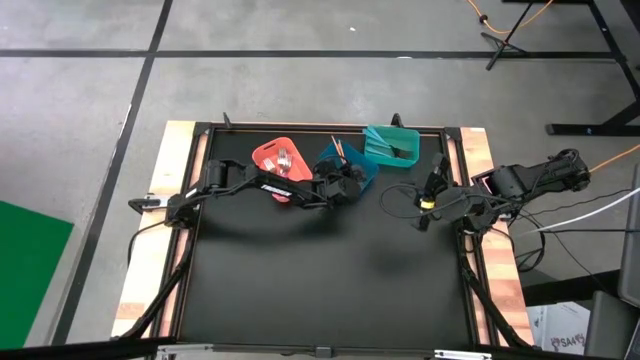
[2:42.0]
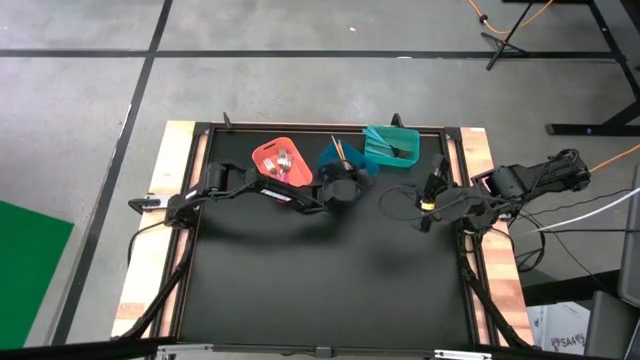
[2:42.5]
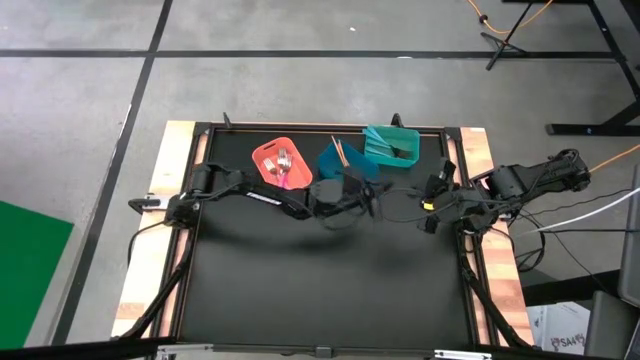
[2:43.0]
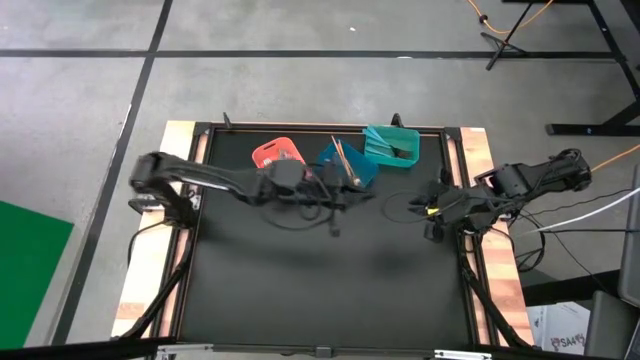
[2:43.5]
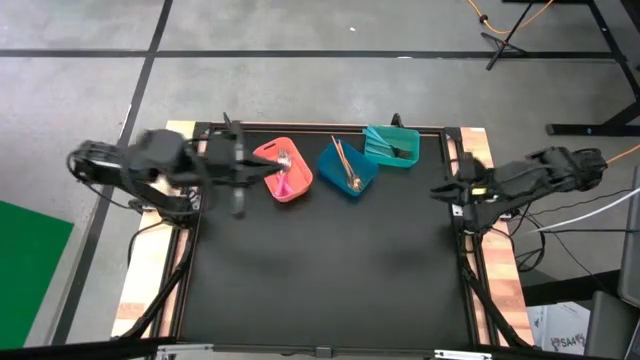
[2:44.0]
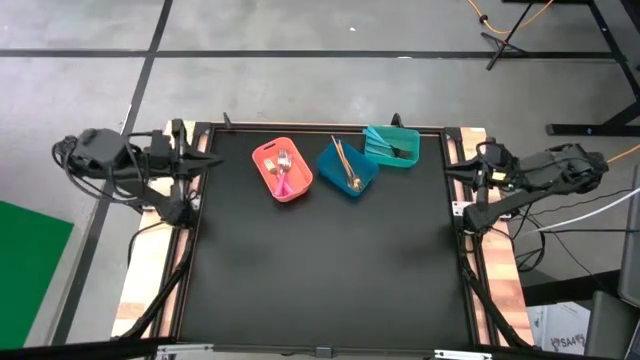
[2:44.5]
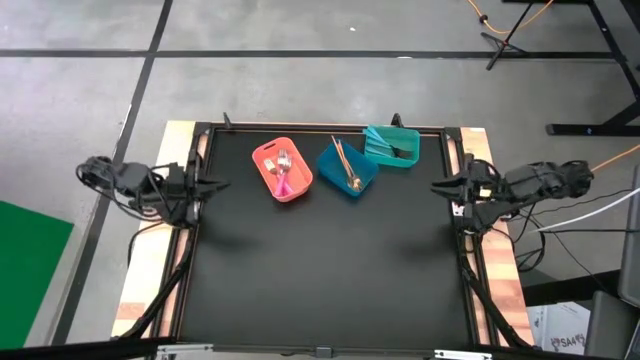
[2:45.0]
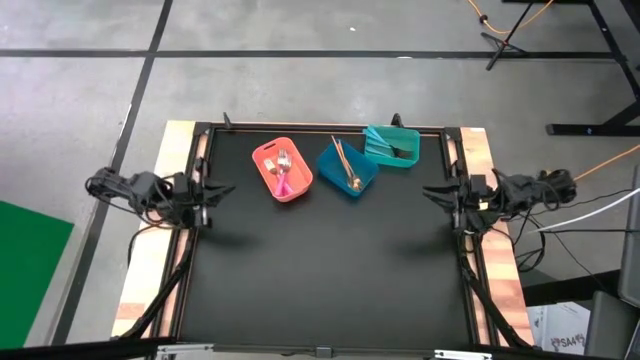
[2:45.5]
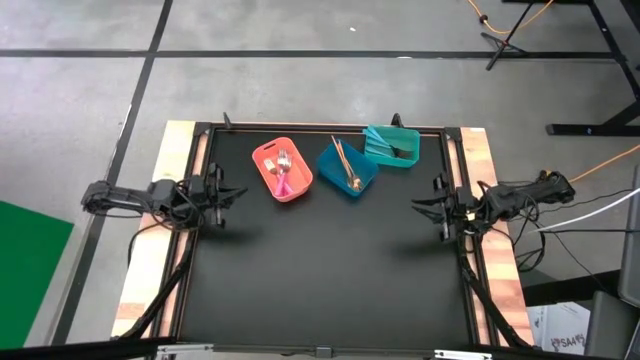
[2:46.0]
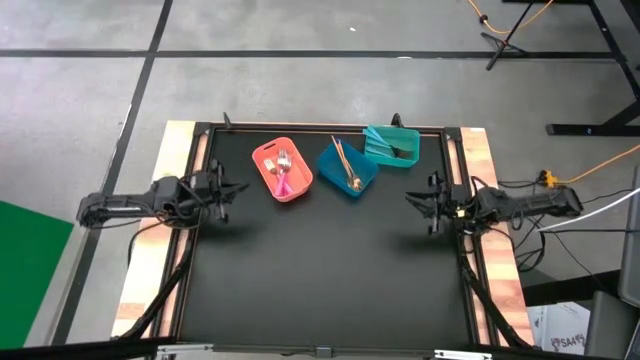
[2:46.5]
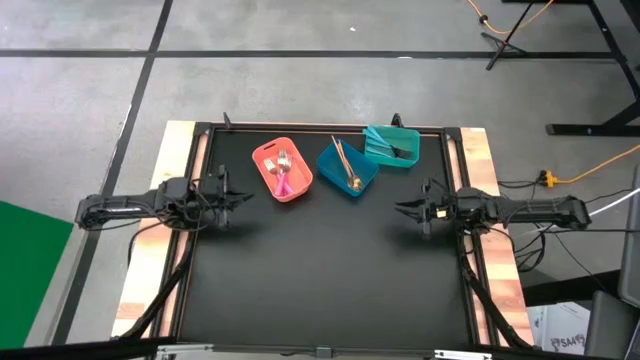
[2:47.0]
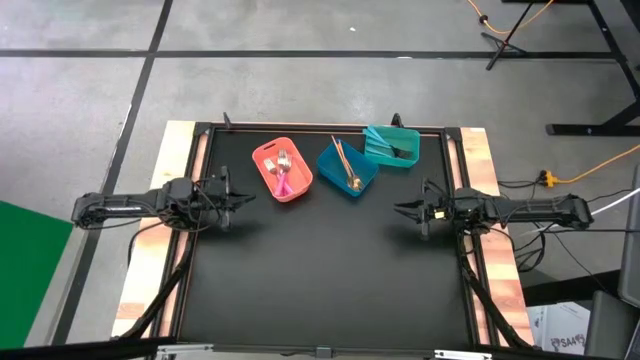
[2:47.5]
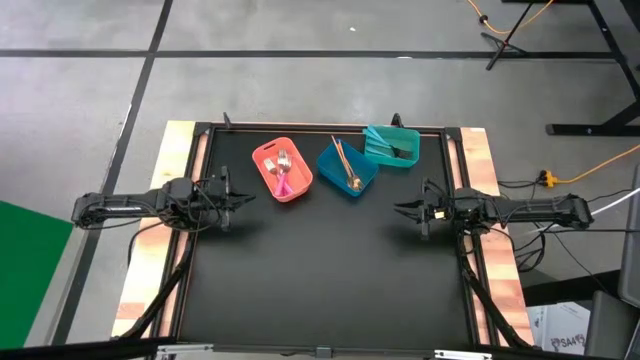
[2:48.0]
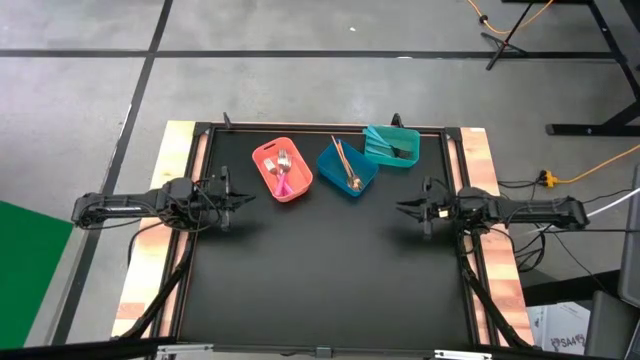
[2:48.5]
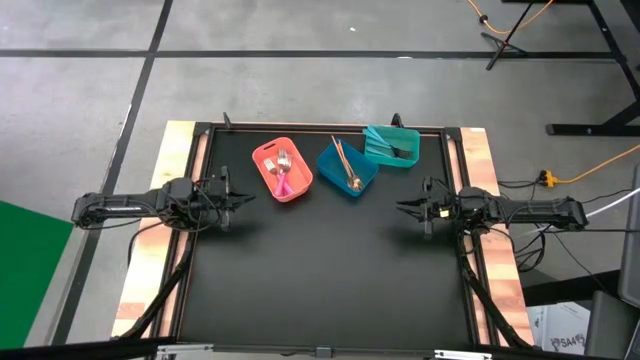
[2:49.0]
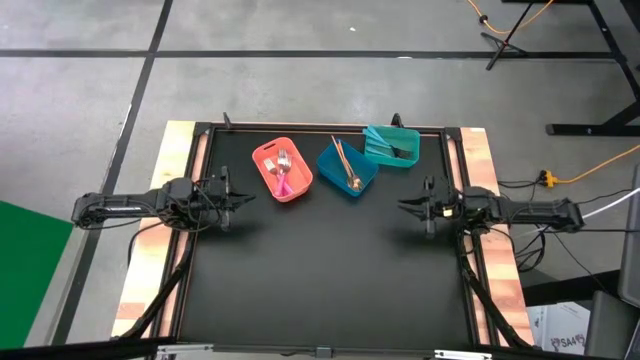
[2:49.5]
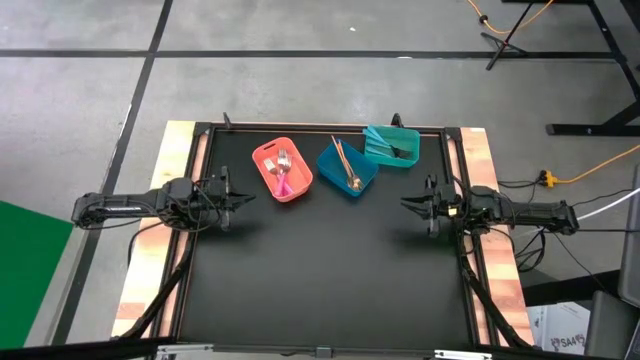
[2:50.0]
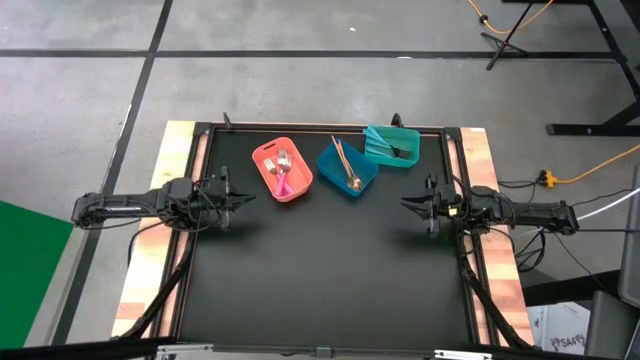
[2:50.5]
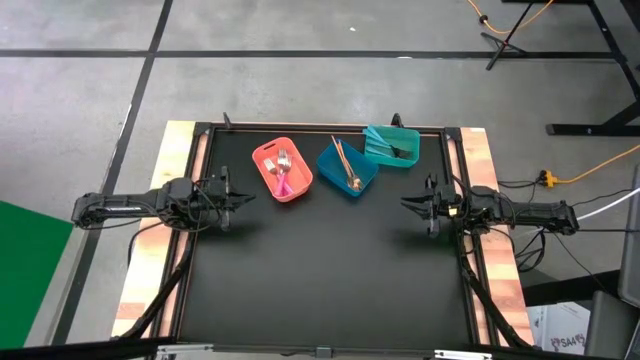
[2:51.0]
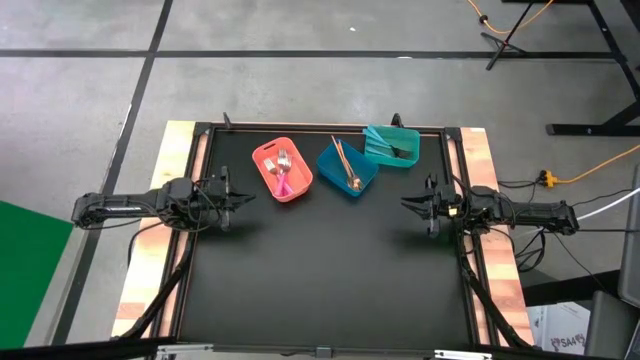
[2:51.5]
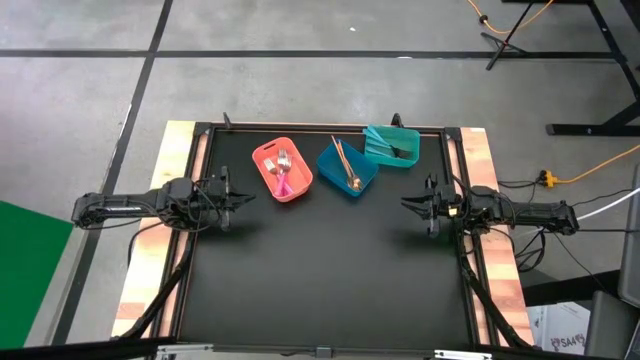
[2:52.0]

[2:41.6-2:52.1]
Task: Sort silverware by color (type)
Return to Home Position

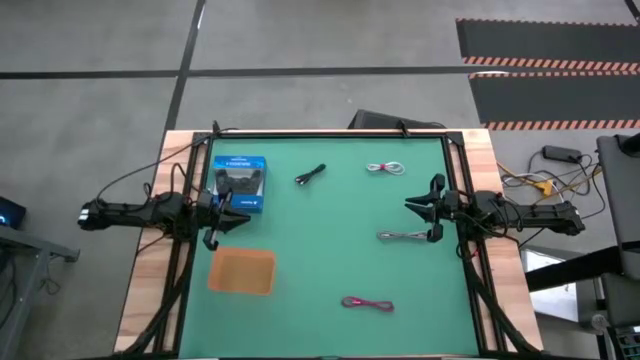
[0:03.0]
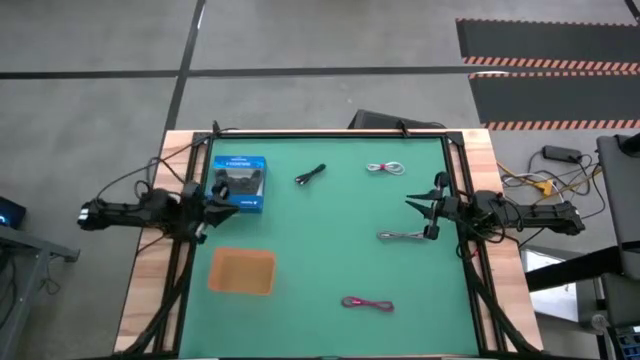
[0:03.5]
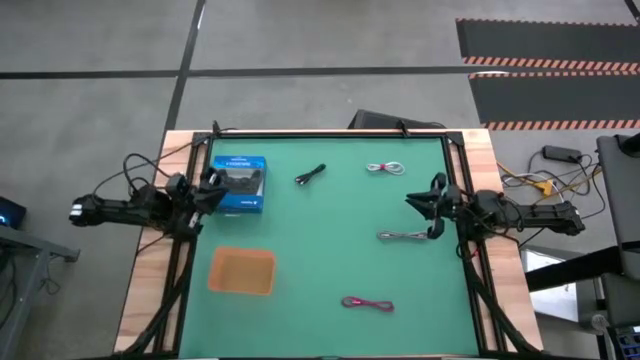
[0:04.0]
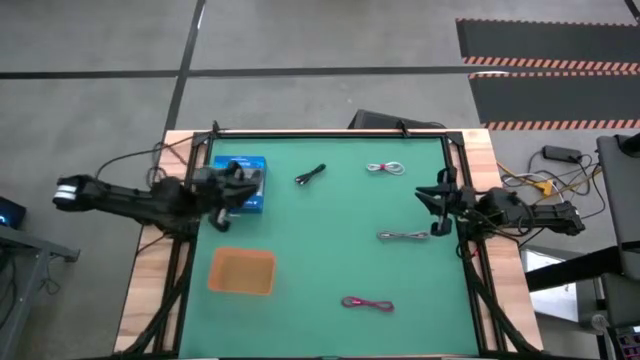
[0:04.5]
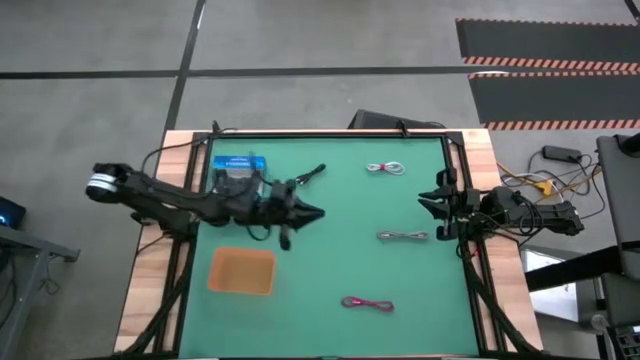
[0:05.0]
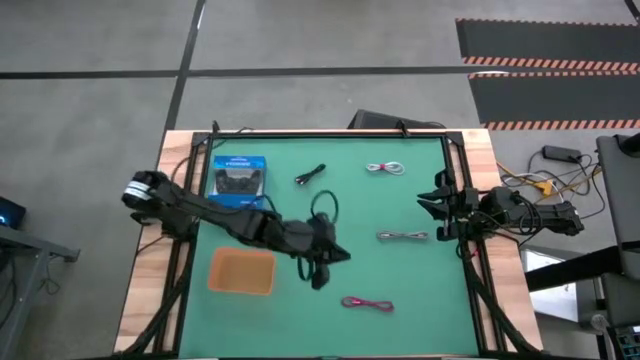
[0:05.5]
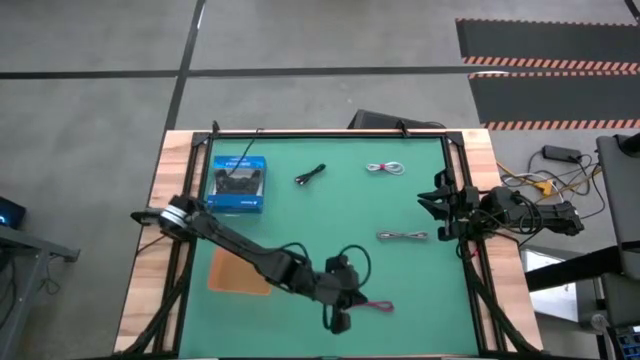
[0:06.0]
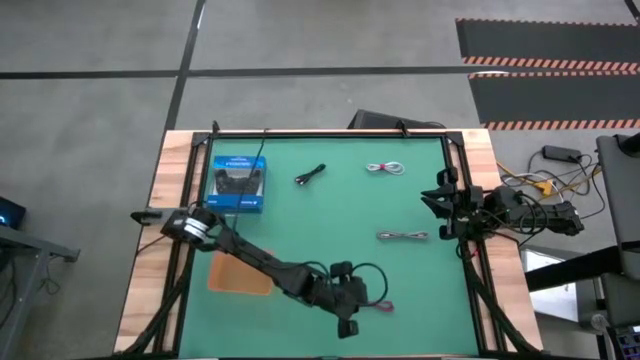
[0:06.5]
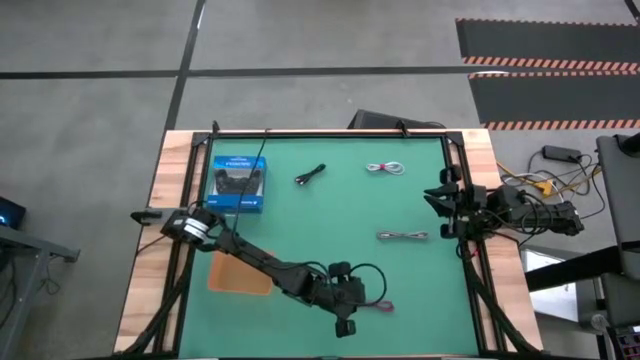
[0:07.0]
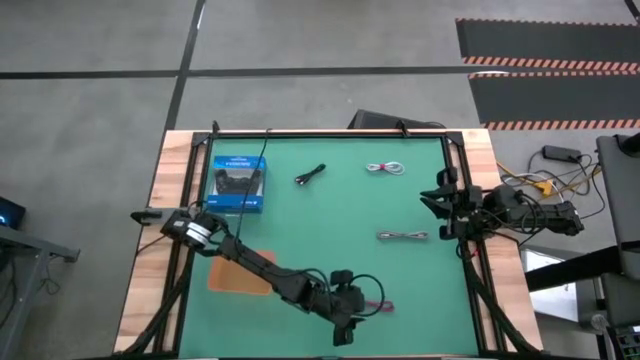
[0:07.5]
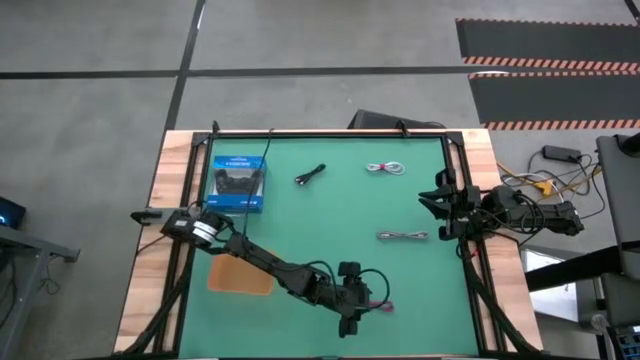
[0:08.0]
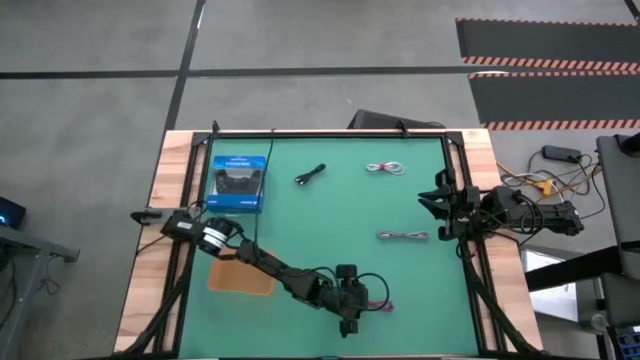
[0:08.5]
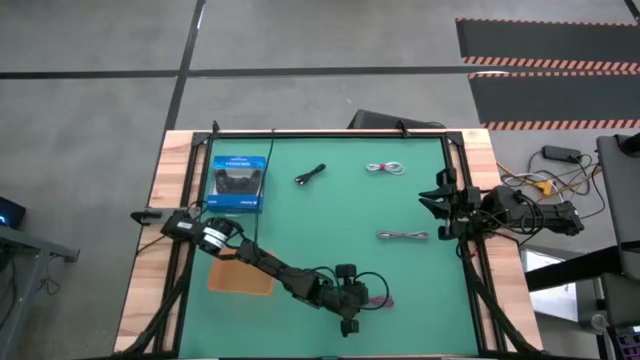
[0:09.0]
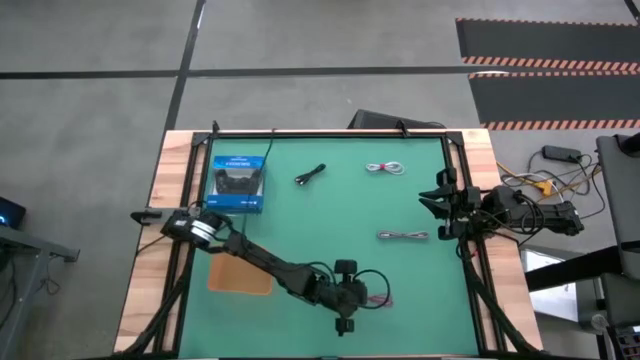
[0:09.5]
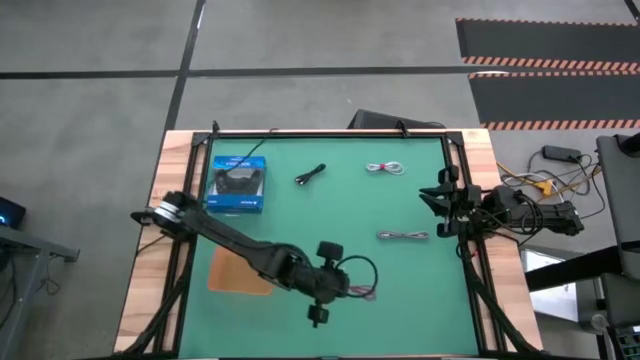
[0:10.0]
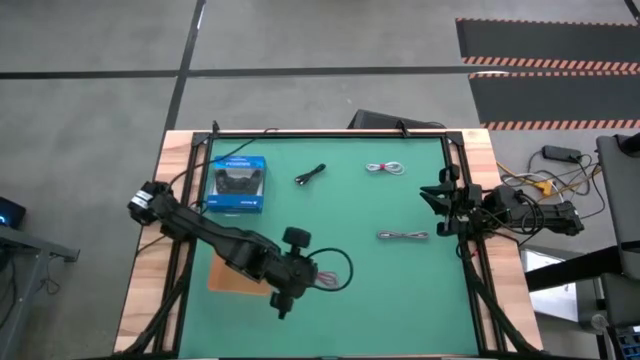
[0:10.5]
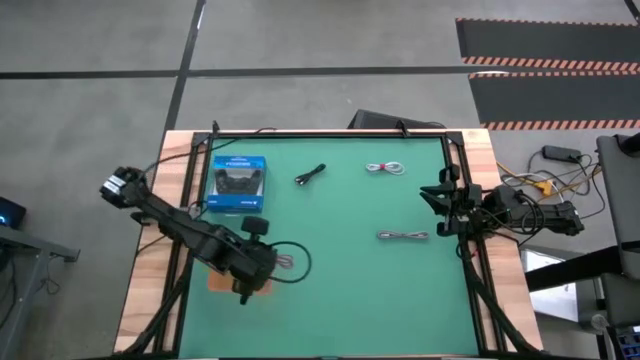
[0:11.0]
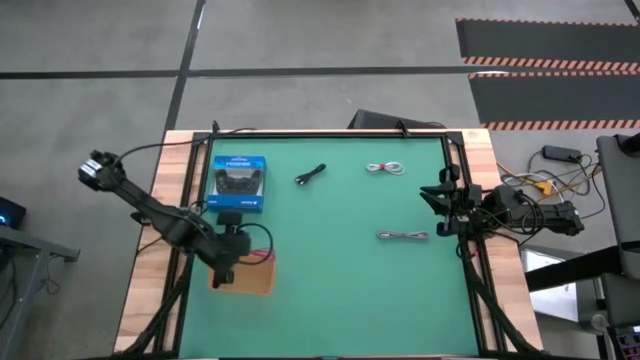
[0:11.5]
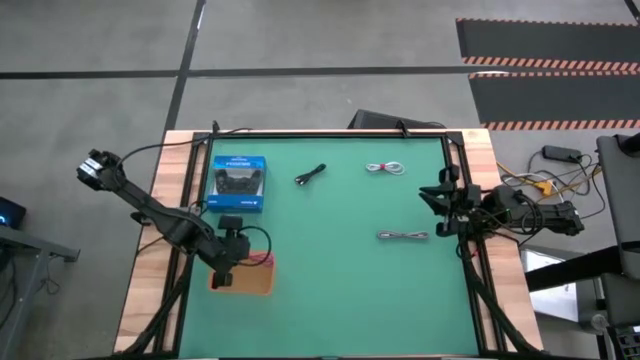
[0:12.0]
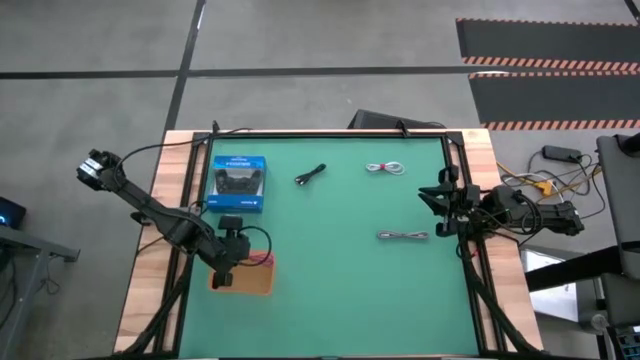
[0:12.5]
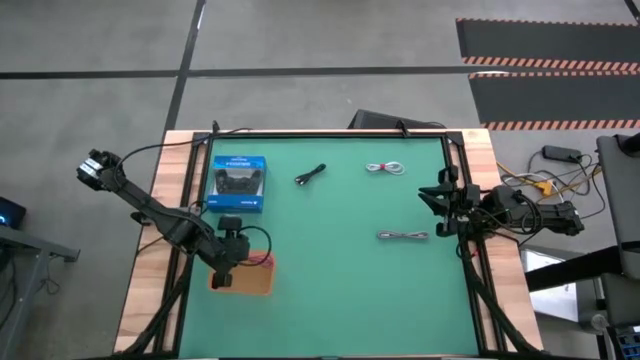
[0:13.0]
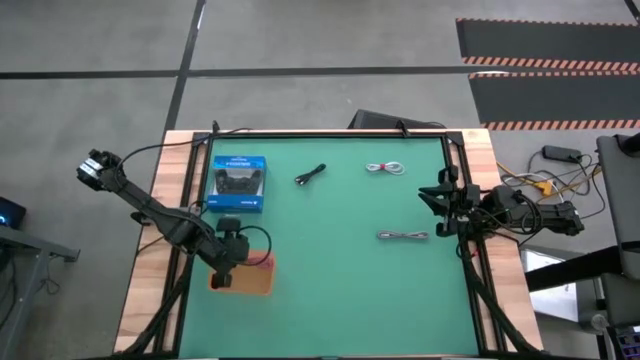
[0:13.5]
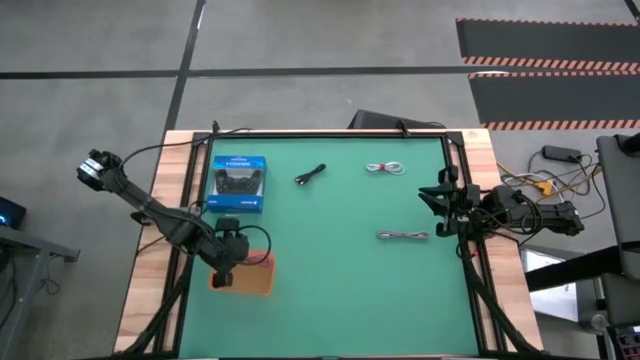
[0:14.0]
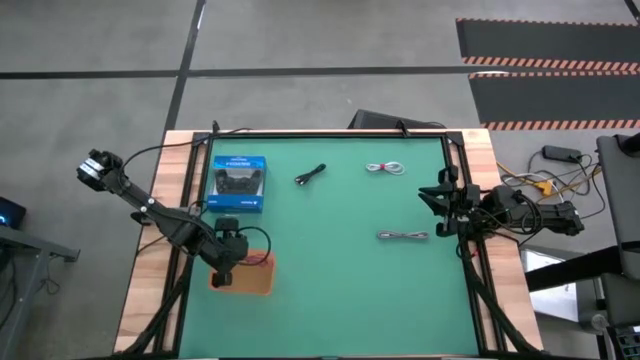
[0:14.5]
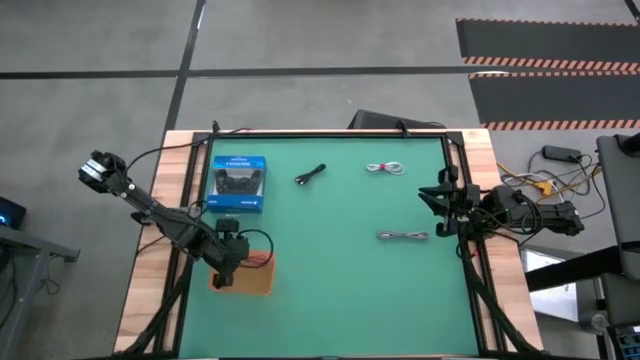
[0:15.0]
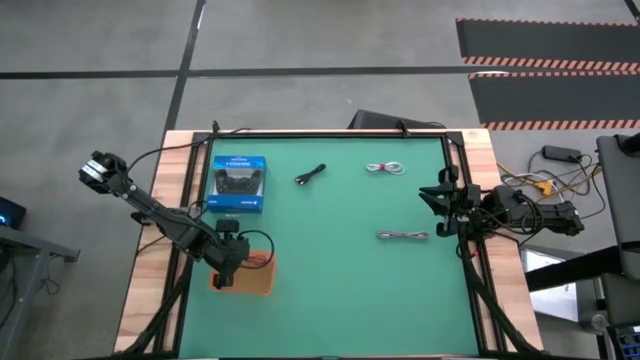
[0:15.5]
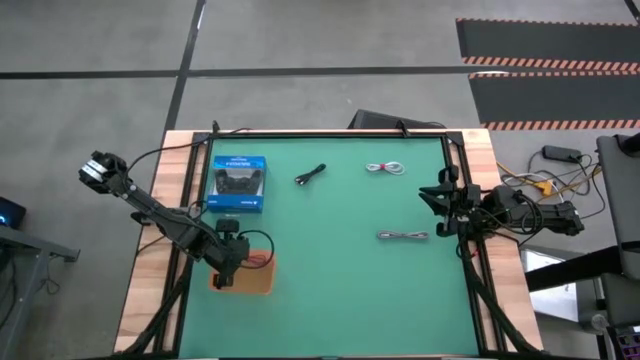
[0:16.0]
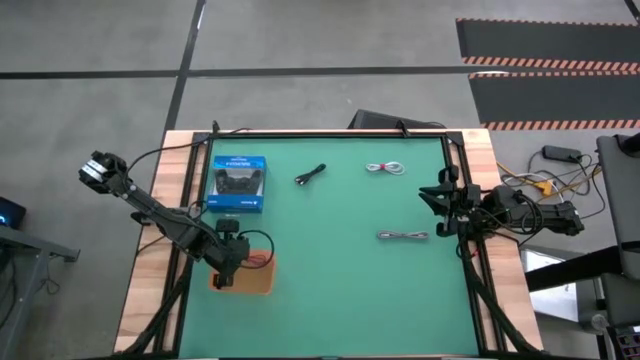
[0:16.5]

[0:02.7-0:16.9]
Task: Pick and place USB-C Cables
Put the pink charger cable into the orange bin
